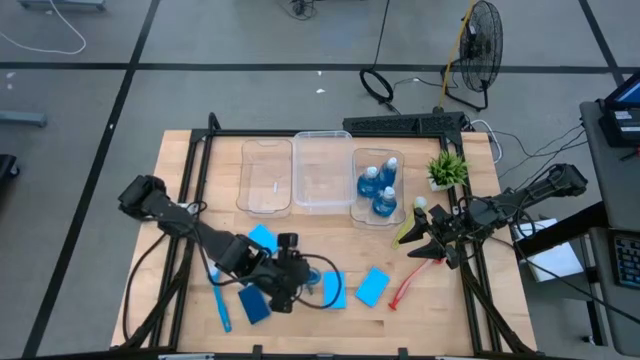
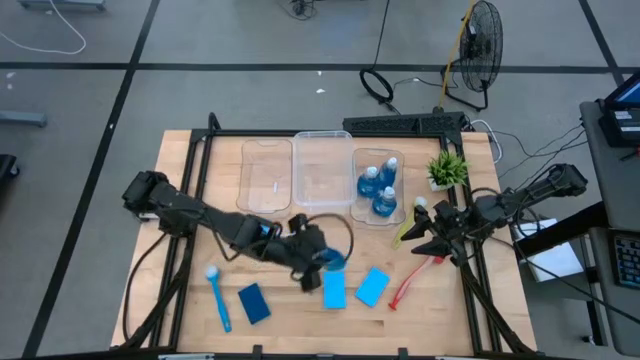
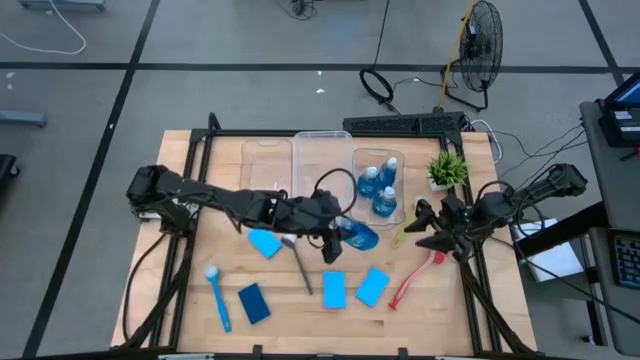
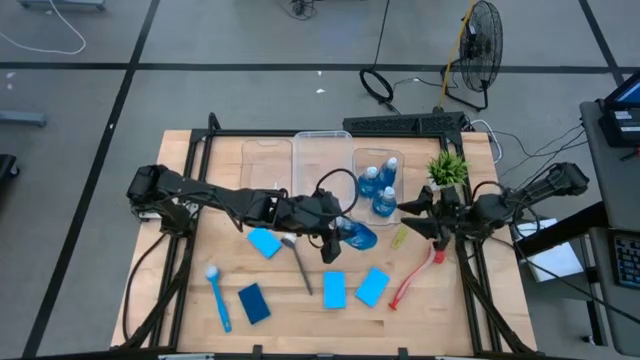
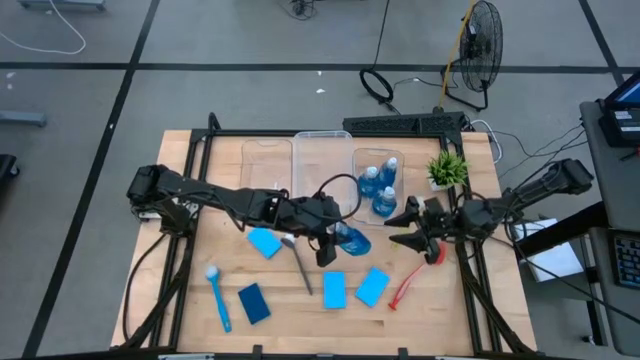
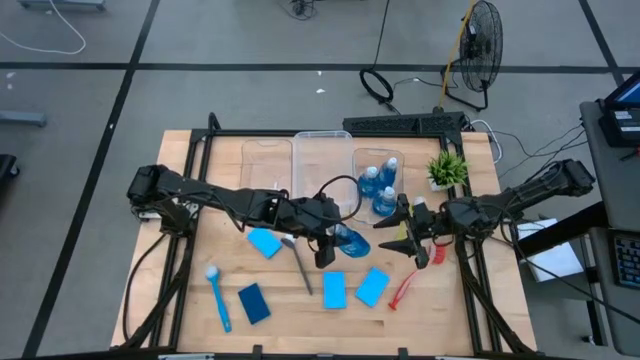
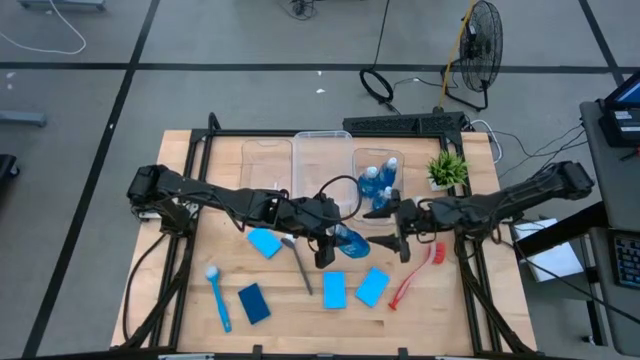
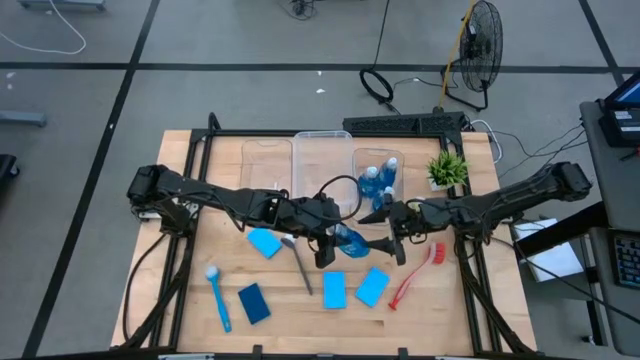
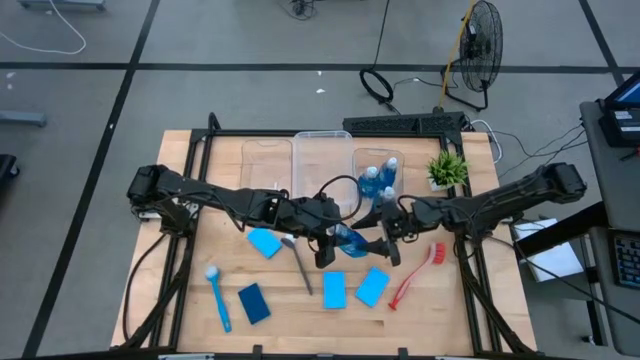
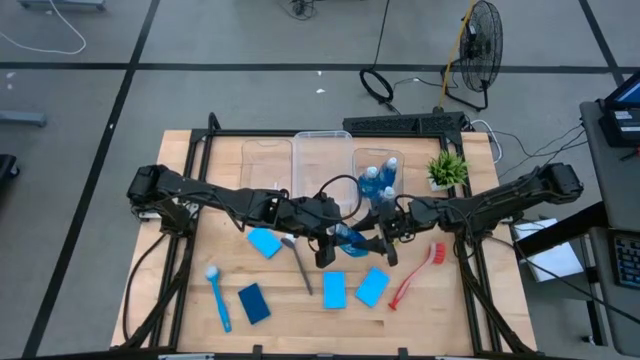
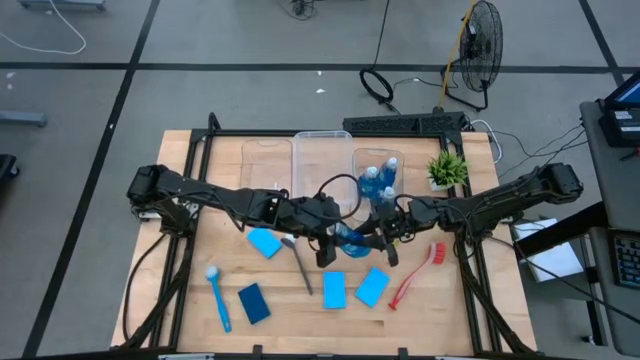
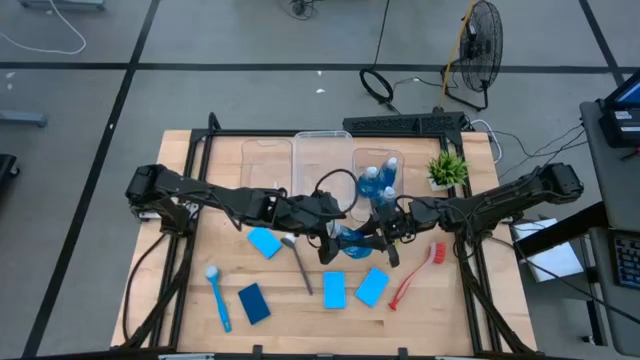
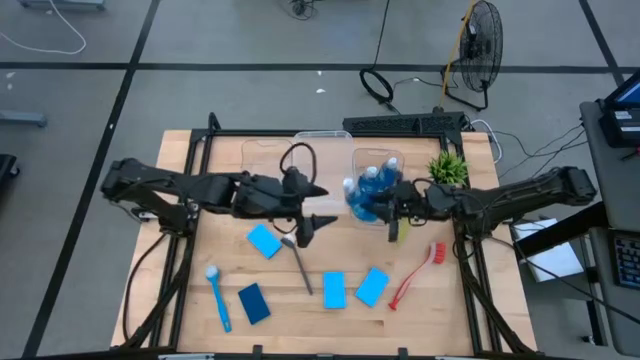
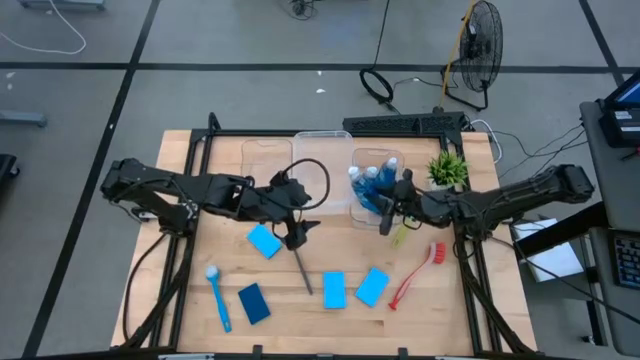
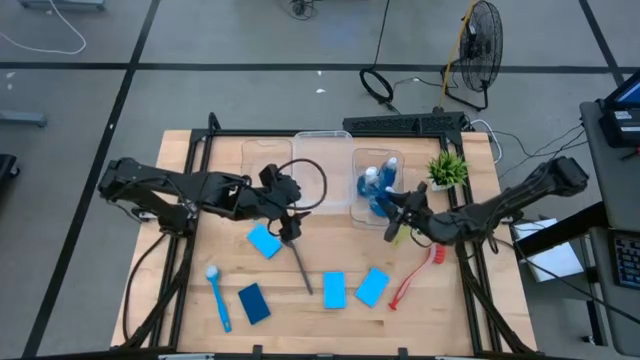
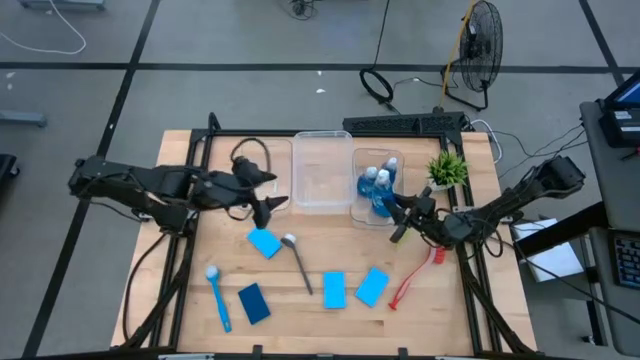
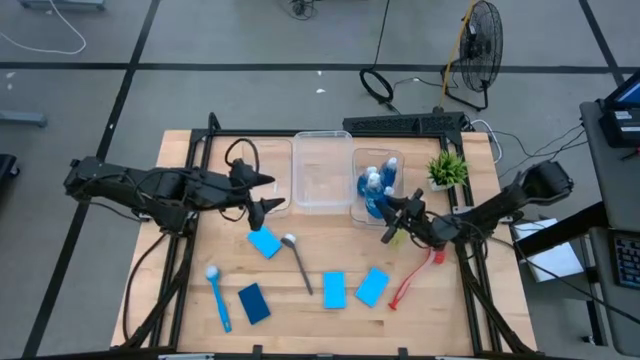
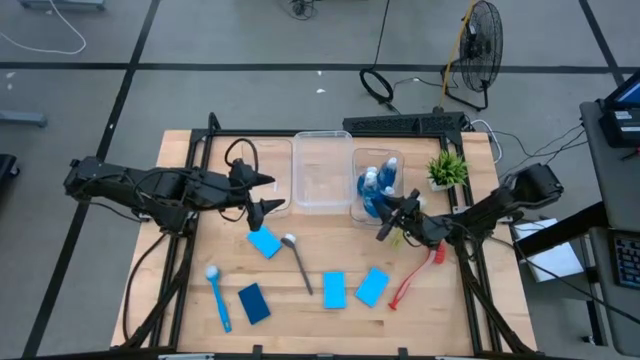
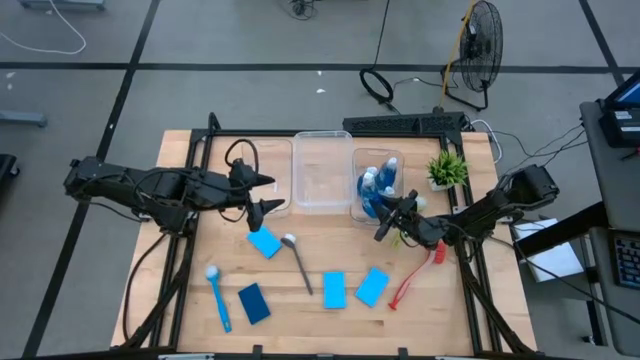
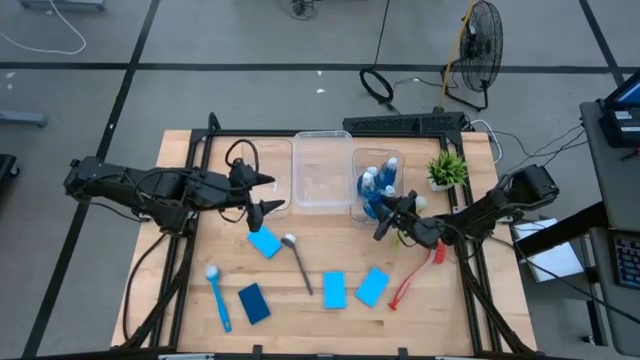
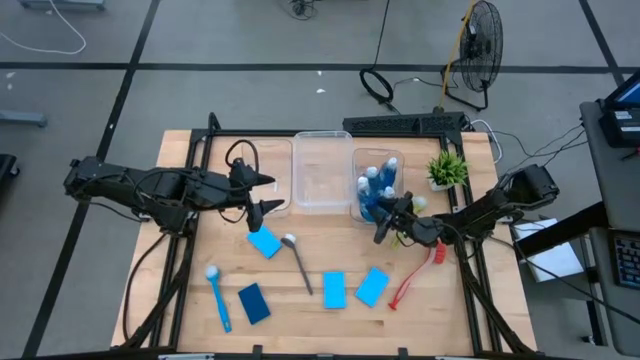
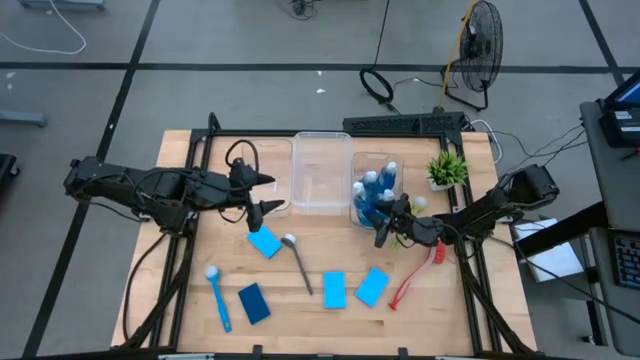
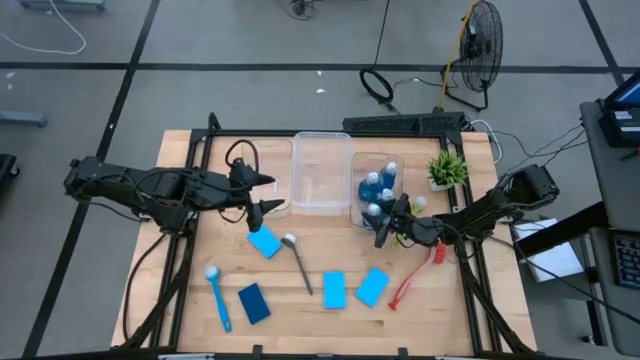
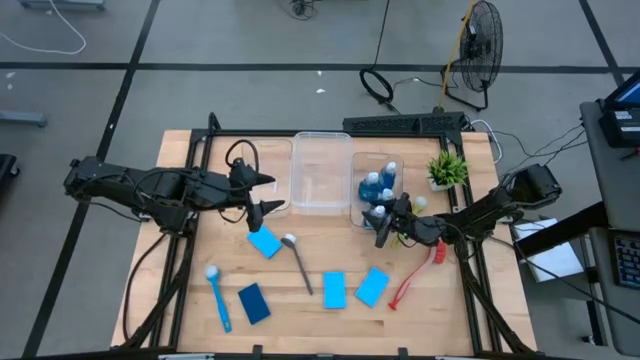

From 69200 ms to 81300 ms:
Task: Pick & Place Kitchen Sink Supplies
Put the blue dishwashing liquid bottle into the right transparent bin

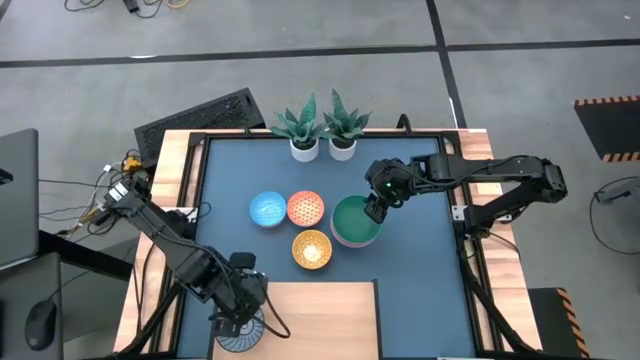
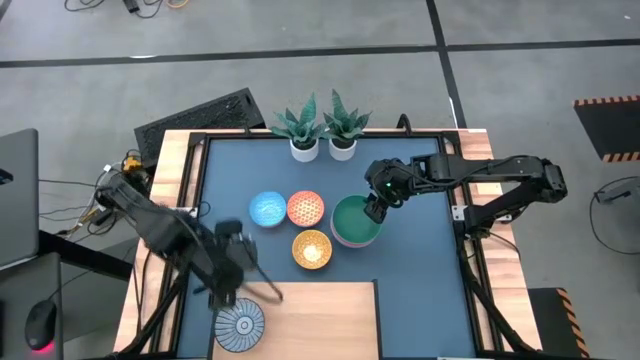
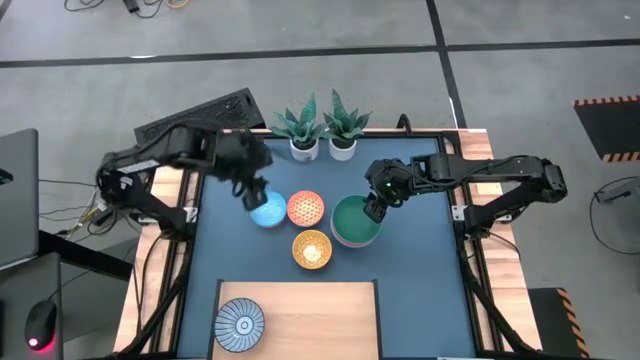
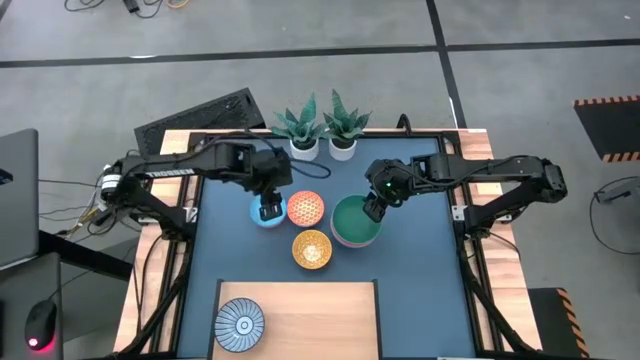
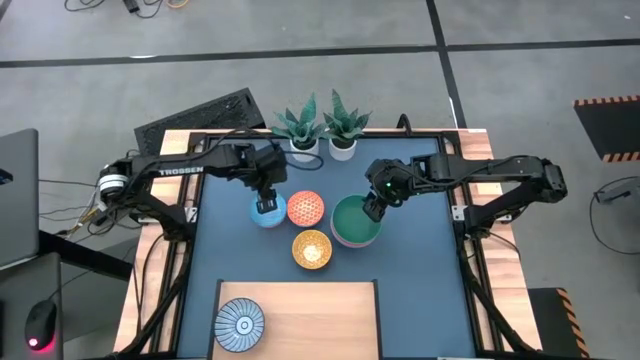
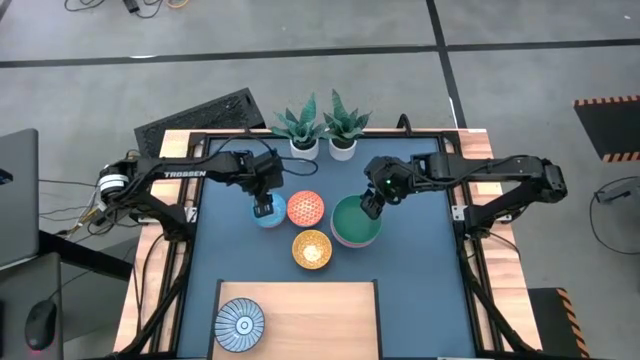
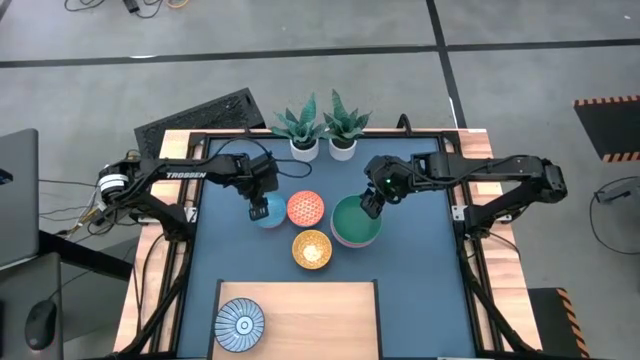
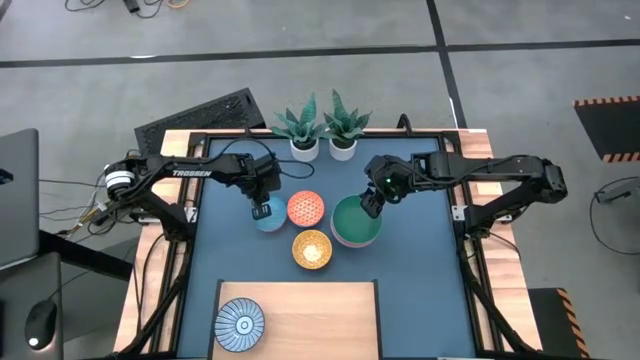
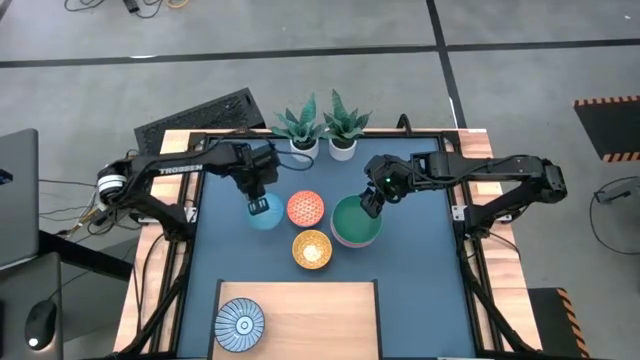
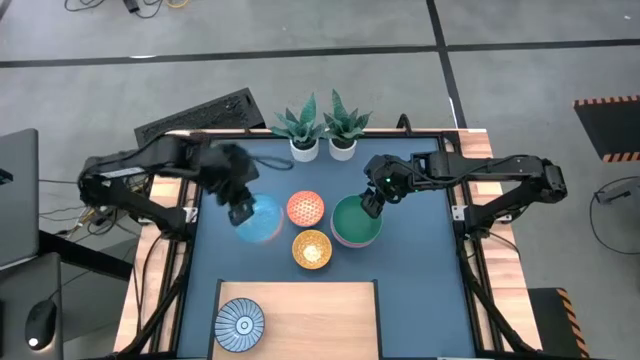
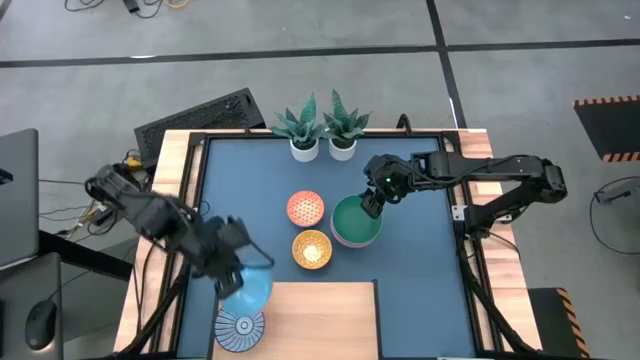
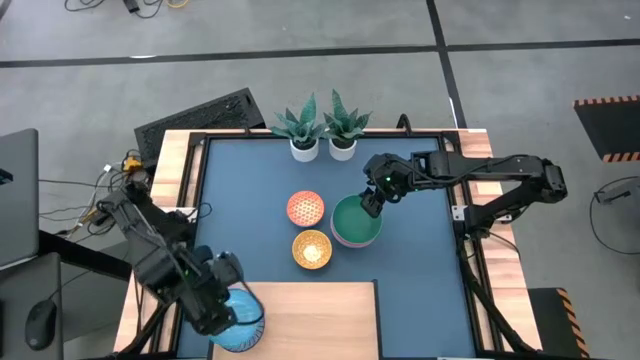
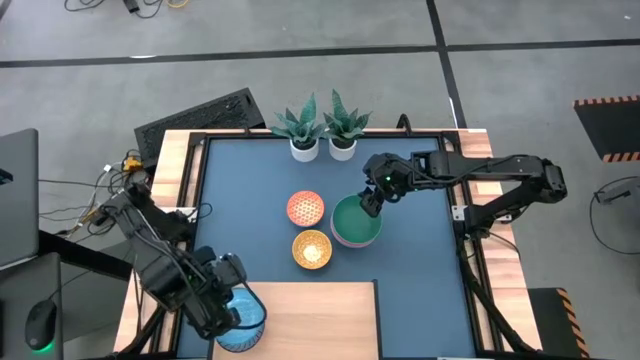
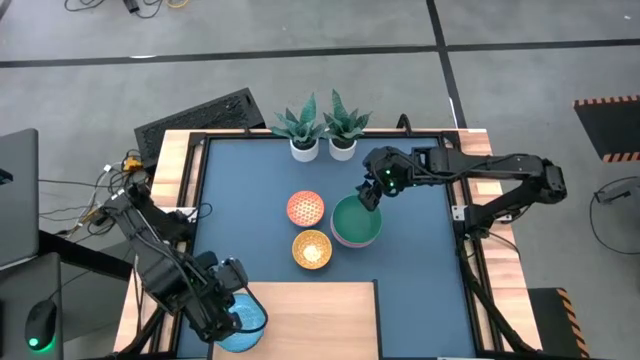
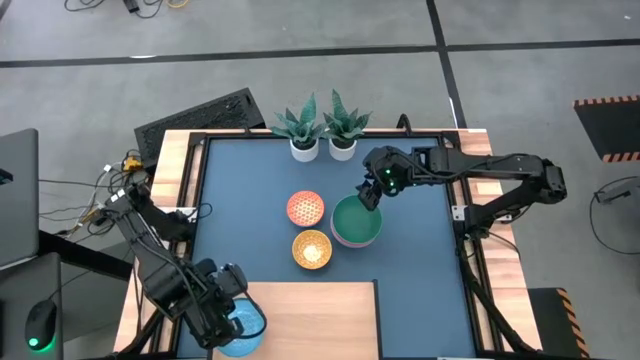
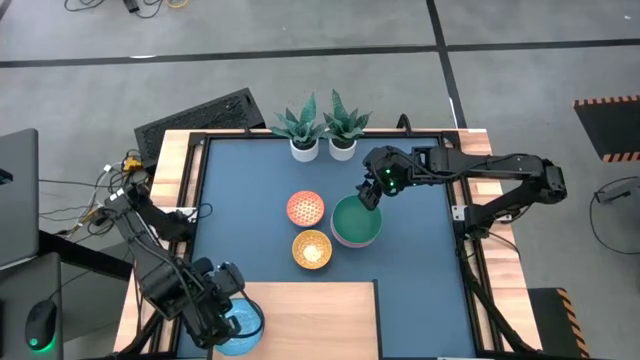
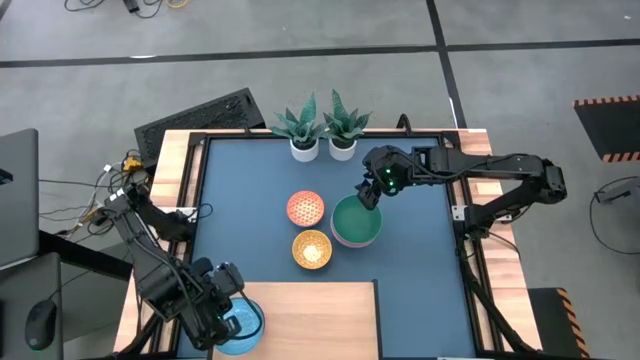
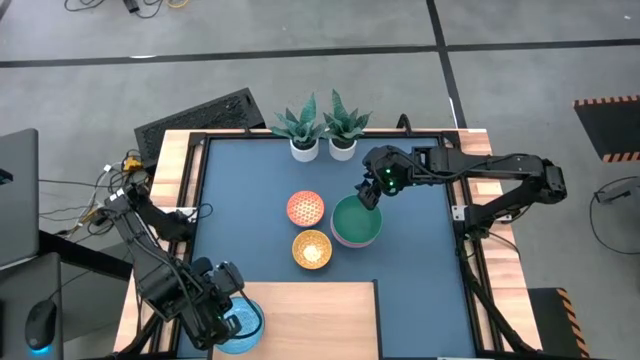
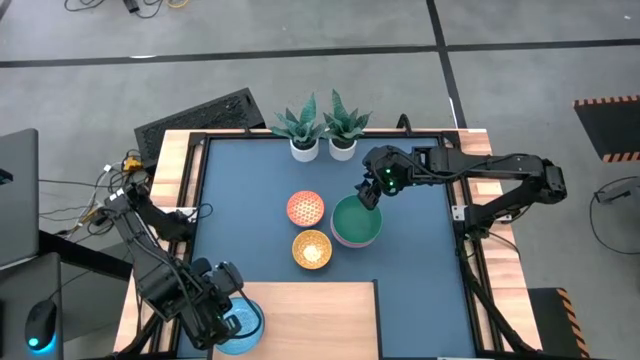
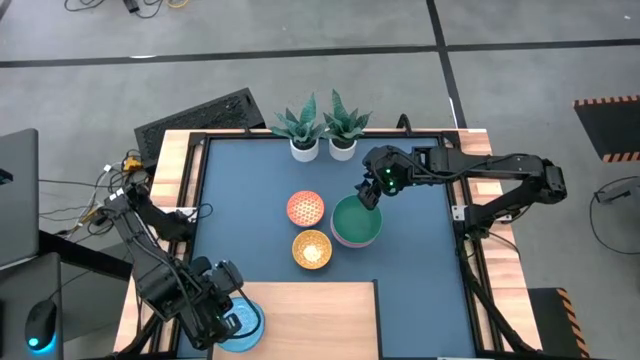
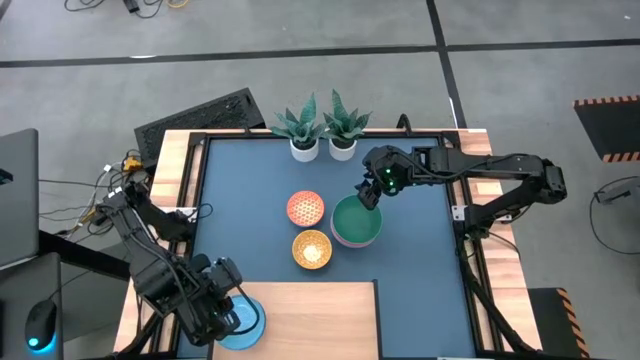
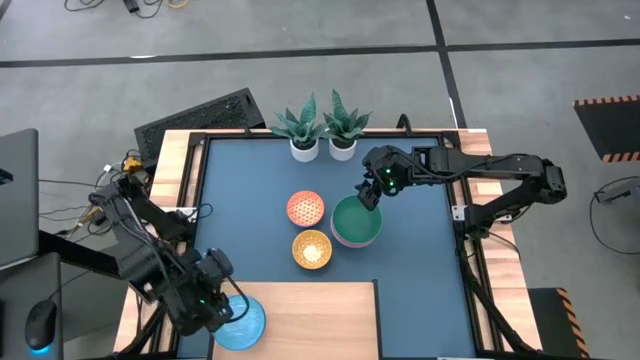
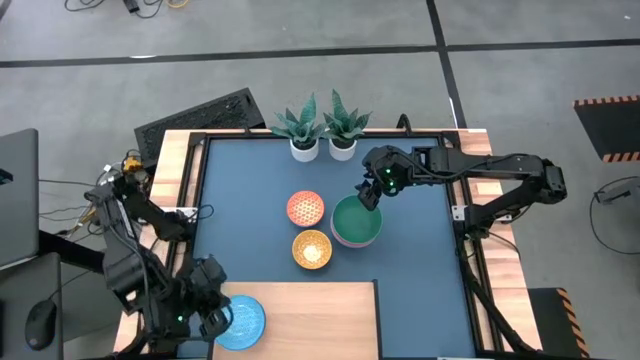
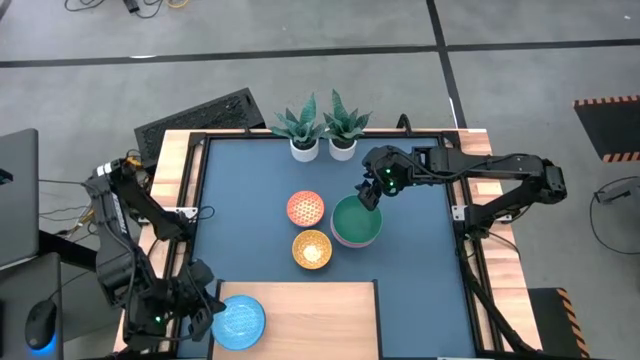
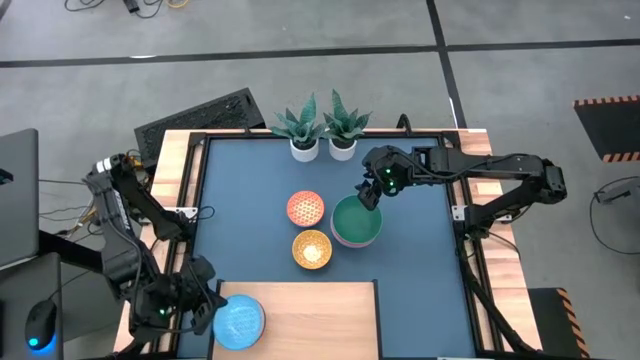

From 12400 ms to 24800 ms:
Task: Place and stack bowls onto a shelf
Stack the light blue and white bowl on top of the dark blue and white bowl on the shelf
